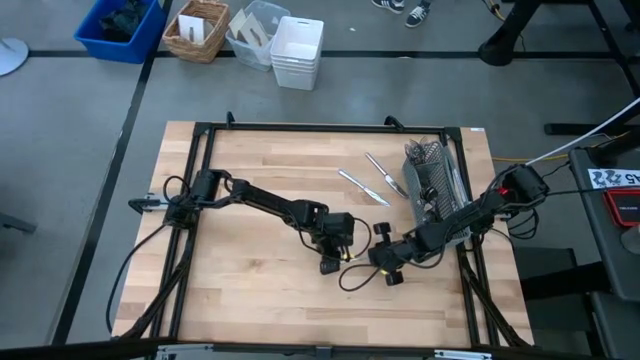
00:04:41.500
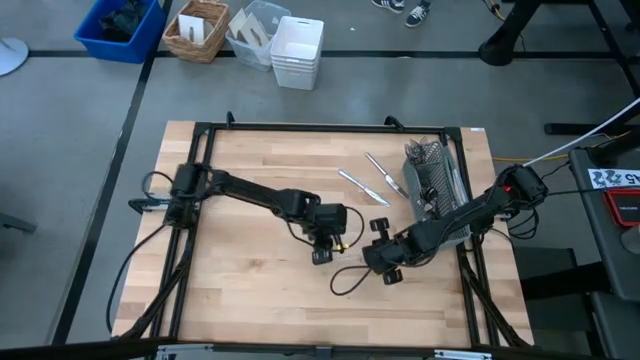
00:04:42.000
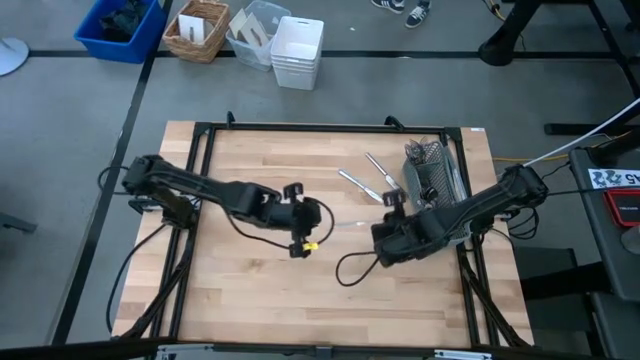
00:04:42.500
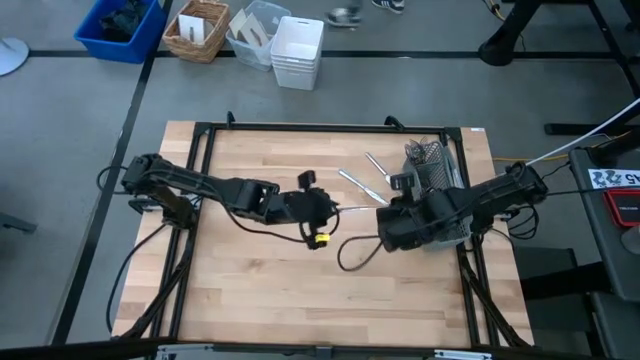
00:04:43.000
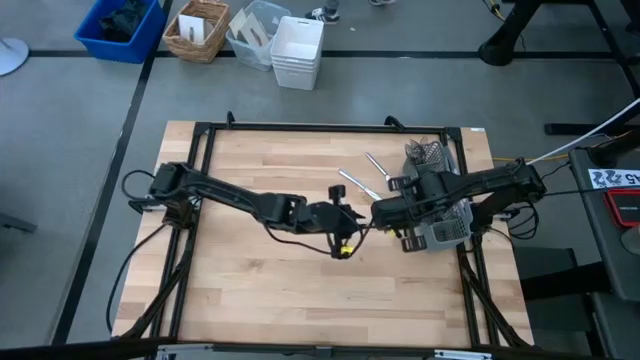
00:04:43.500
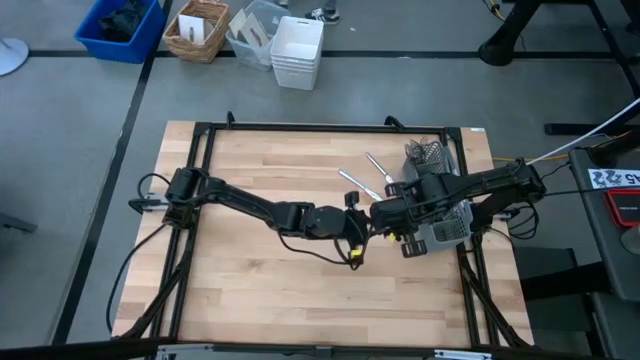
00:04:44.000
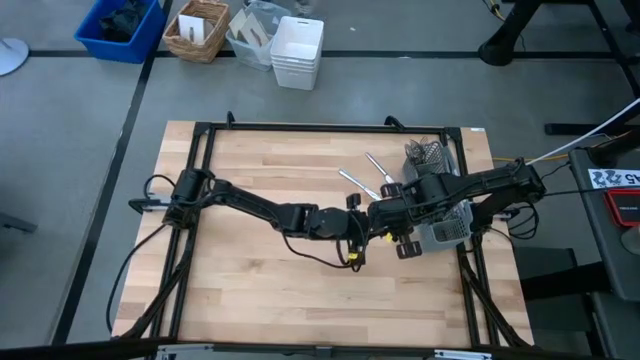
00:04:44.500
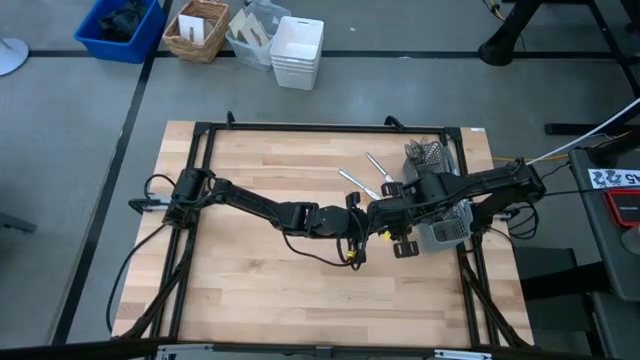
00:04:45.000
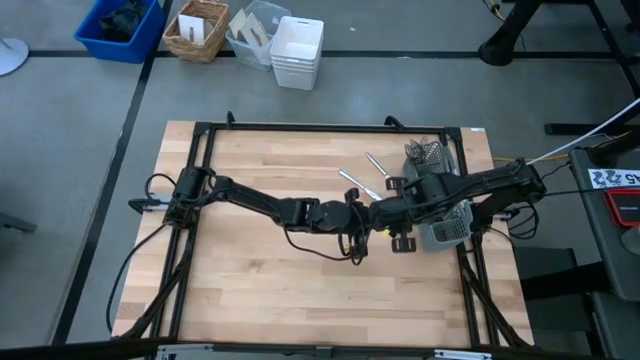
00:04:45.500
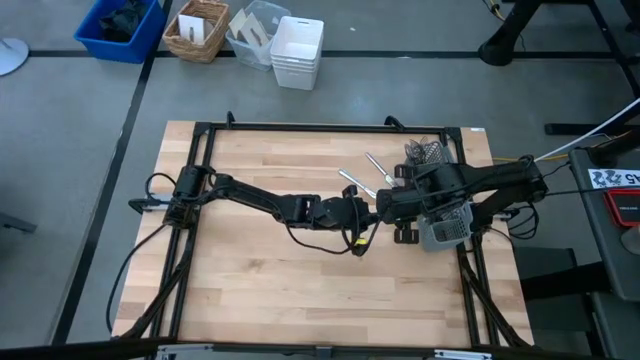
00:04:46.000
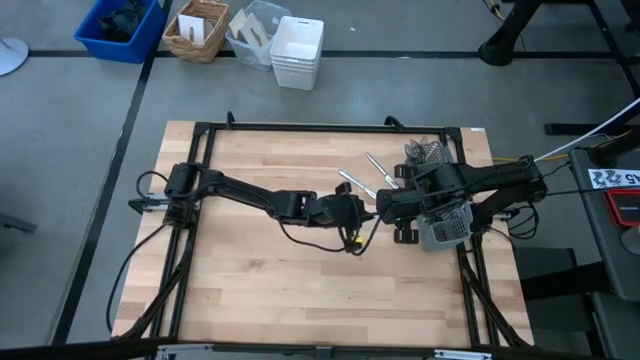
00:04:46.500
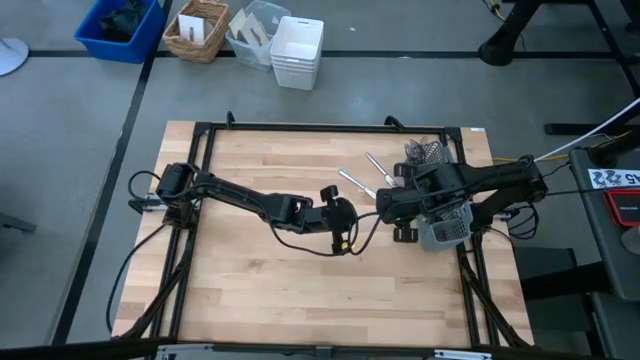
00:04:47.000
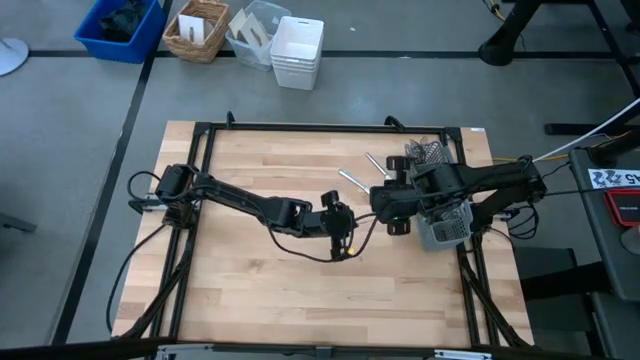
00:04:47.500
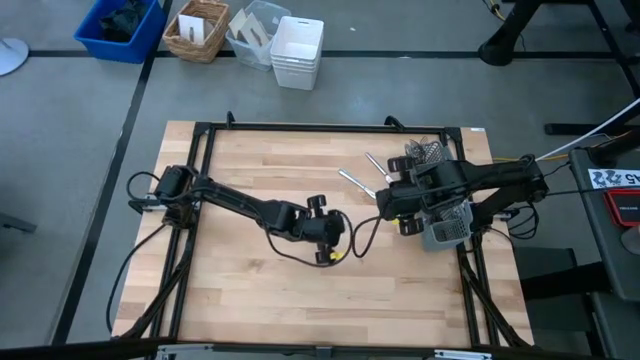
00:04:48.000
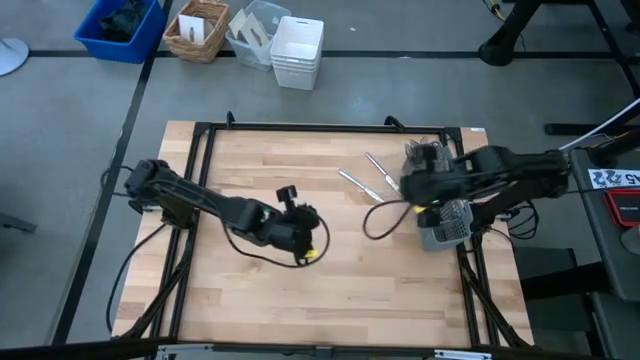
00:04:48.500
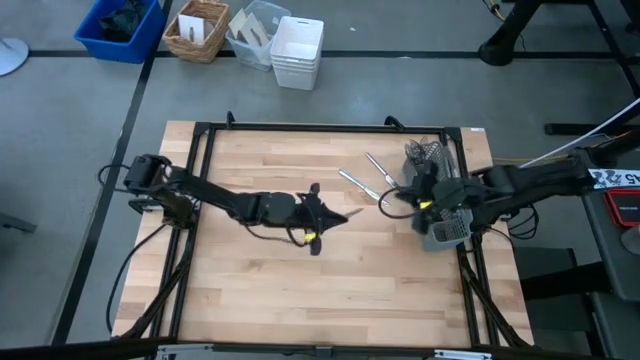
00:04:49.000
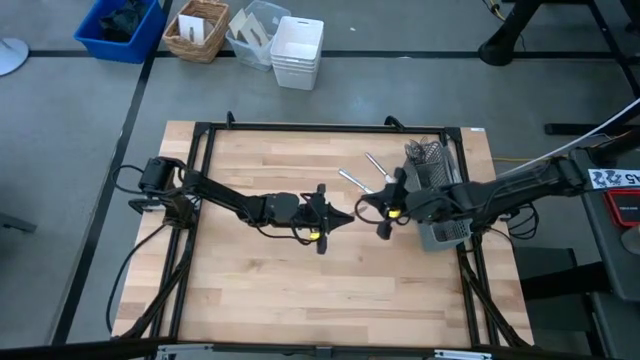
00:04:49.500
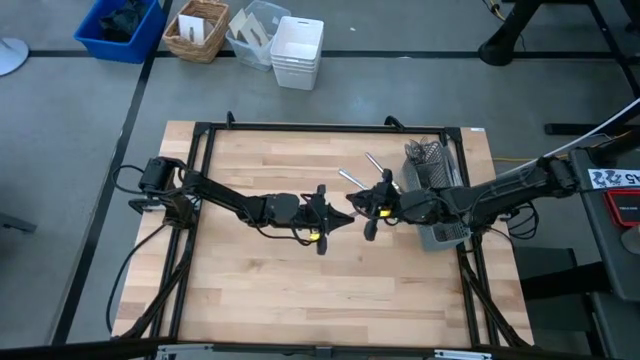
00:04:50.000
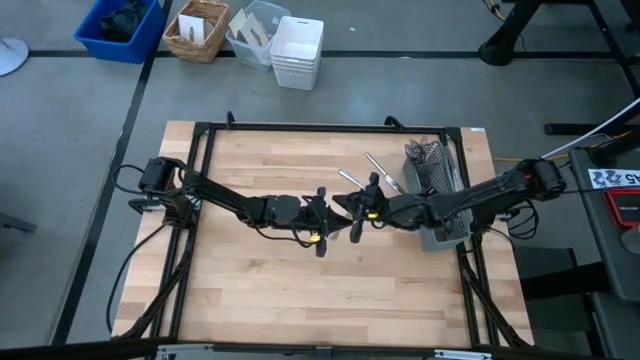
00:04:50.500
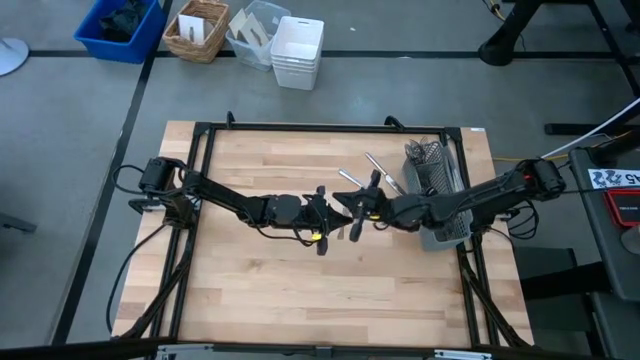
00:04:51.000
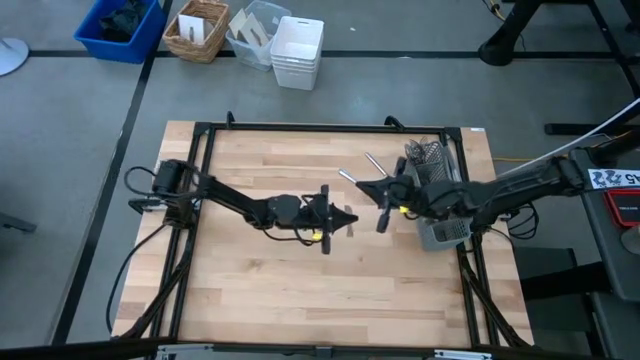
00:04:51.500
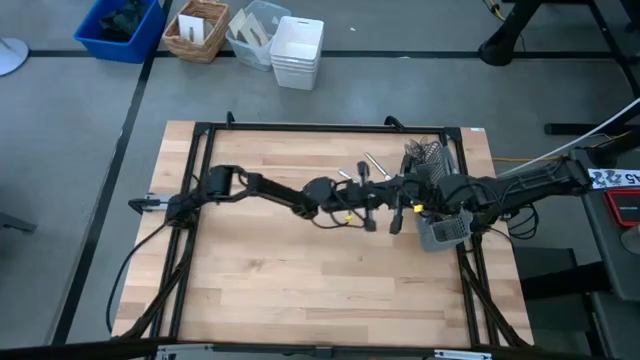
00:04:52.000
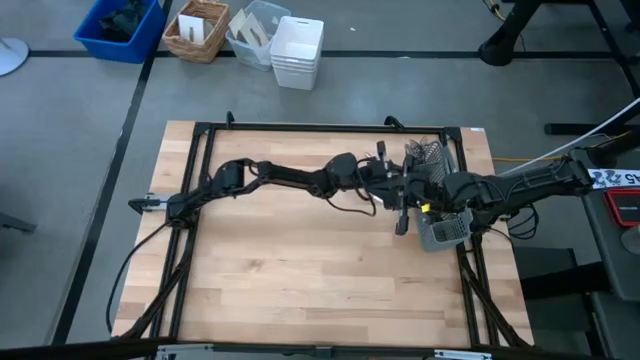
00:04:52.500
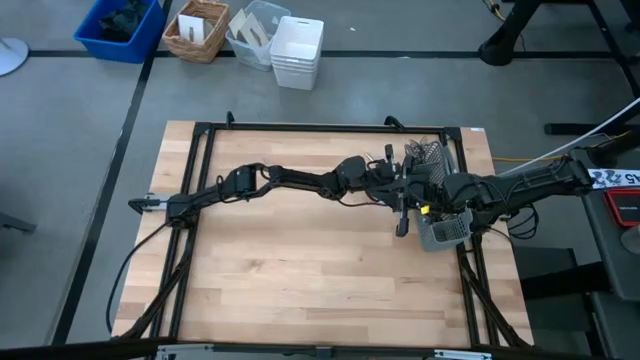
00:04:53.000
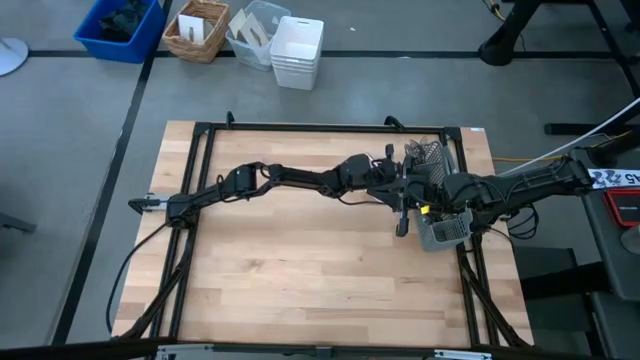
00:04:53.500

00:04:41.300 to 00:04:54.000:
Task: Sort silverware
Put the bottom knife into the middle section of the utensil holder

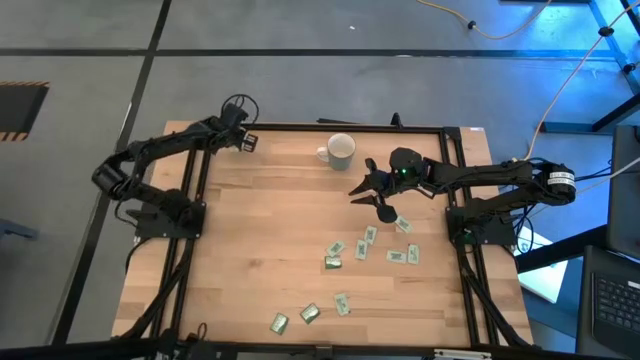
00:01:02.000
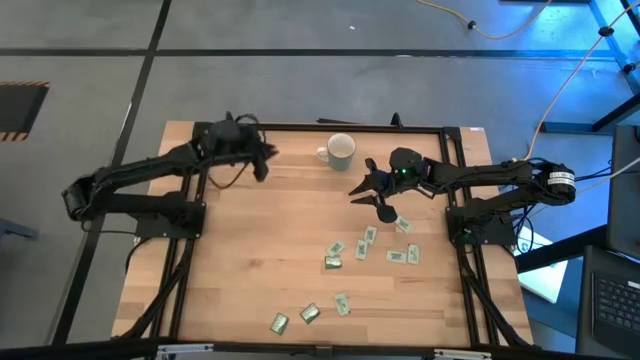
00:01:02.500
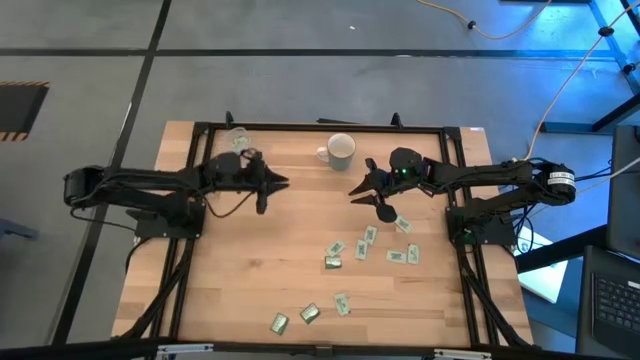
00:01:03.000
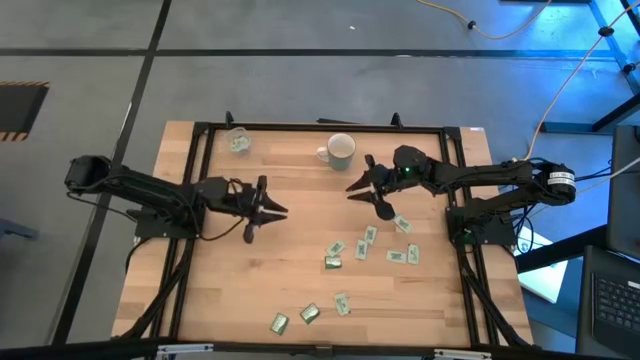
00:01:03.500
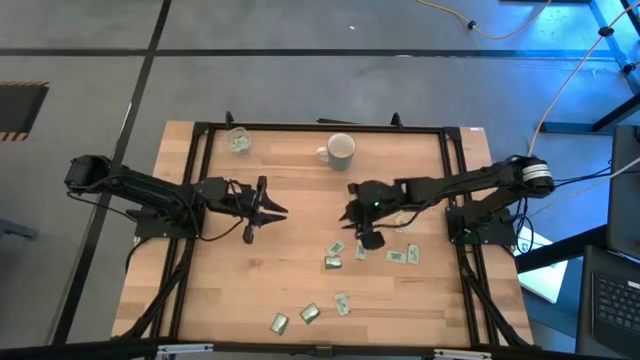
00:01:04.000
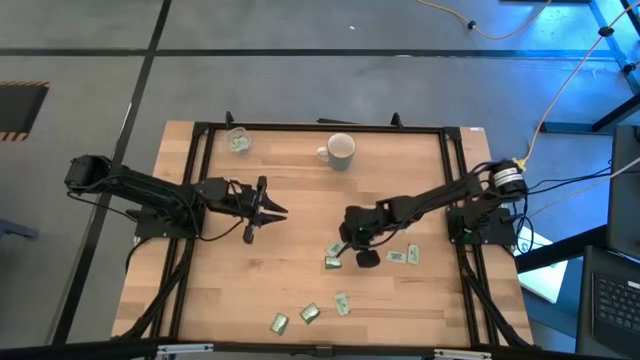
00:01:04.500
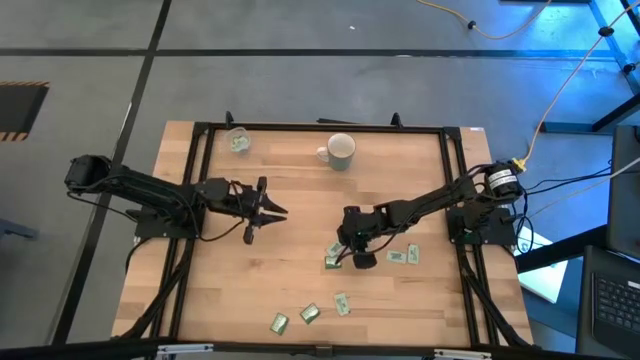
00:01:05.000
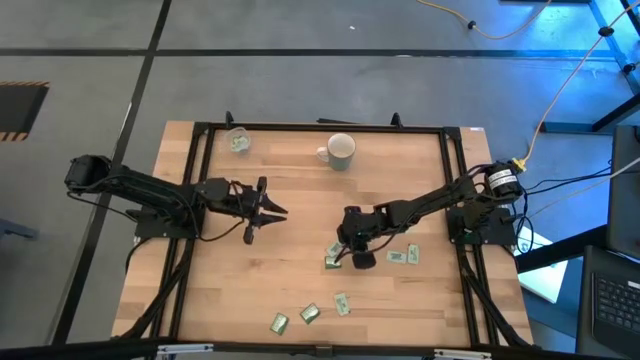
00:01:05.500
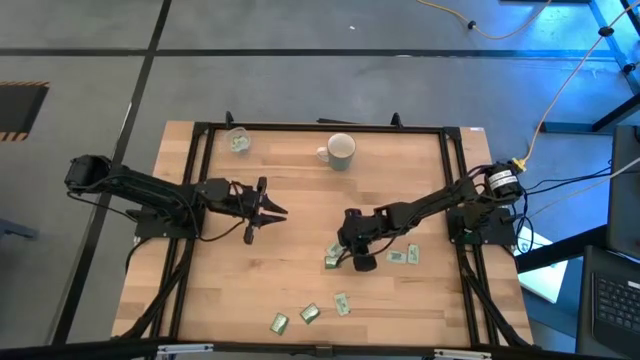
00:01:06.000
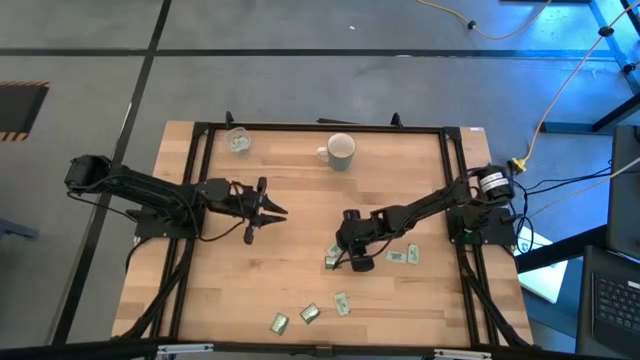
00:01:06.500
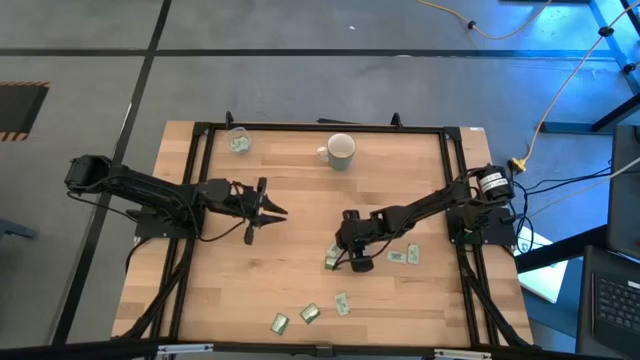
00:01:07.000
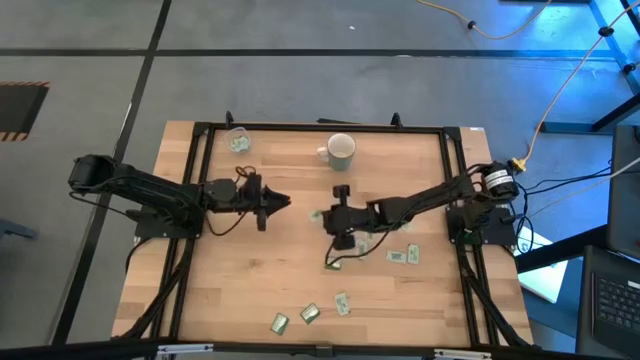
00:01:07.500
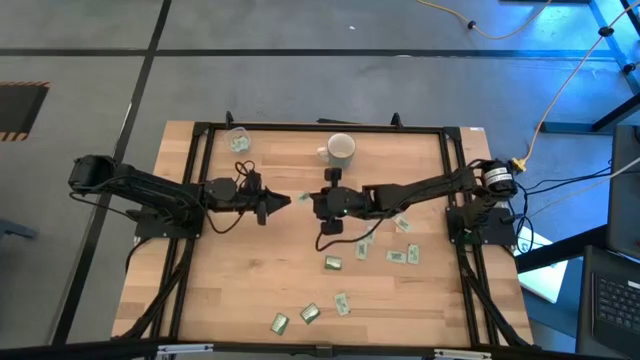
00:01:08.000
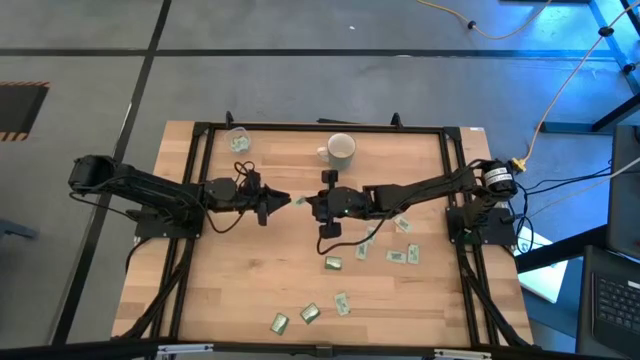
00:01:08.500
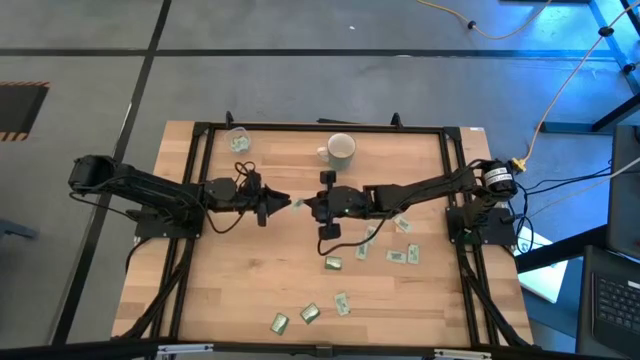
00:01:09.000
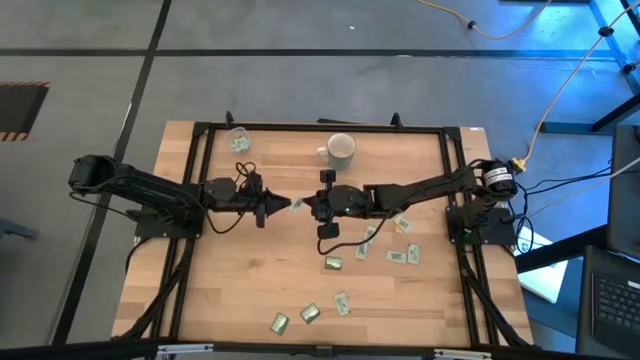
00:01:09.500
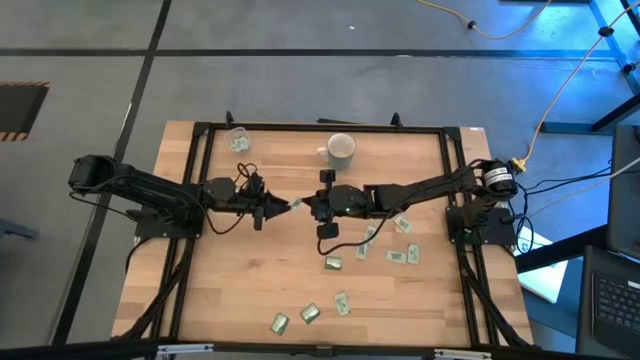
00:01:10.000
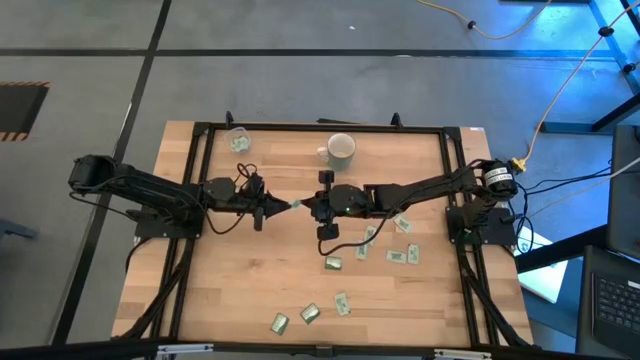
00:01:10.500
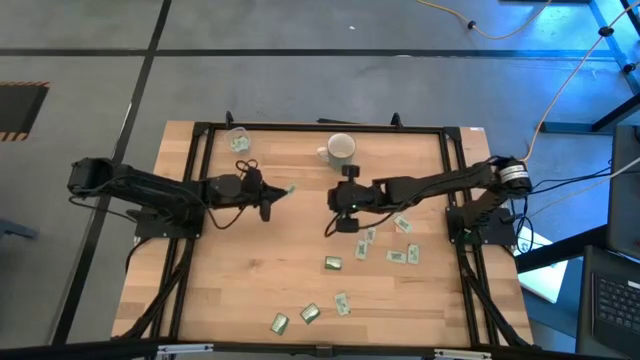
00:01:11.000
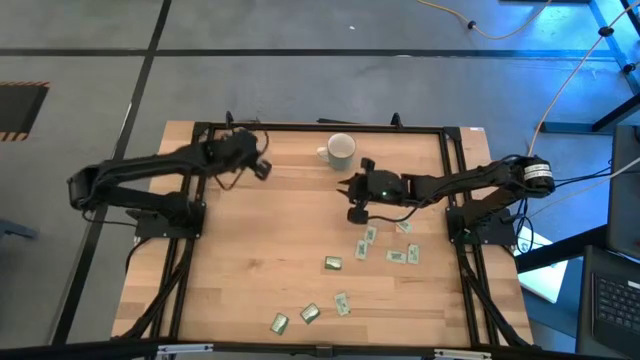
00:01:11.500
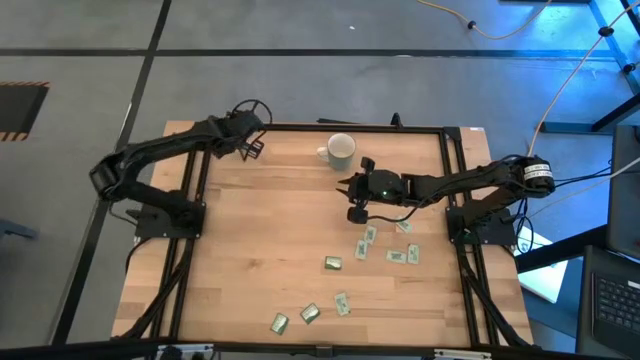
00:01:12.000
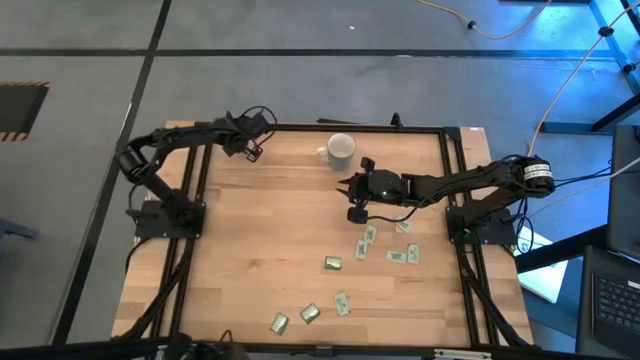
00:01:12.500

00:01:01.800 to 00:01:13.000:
Task: Pick and place Stevia / Truvia into bins
Put the stevia packet into the transparent bin
